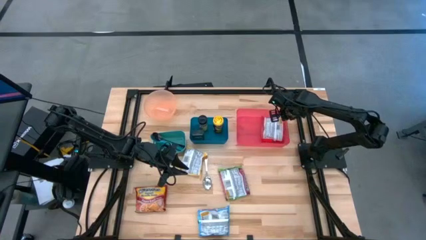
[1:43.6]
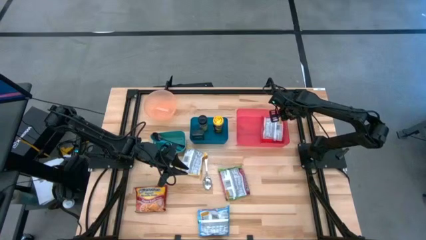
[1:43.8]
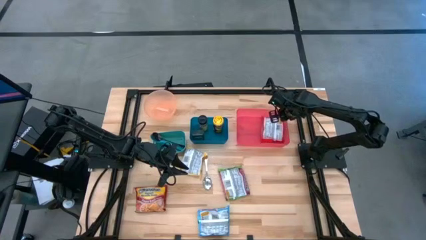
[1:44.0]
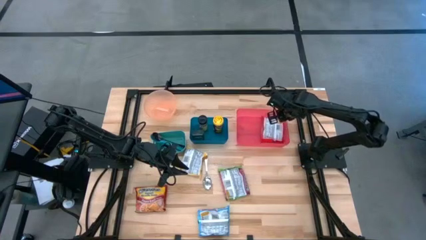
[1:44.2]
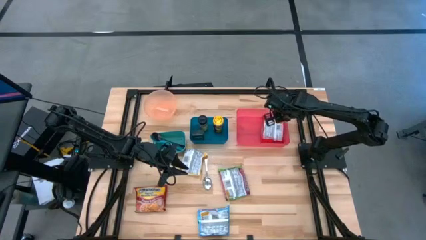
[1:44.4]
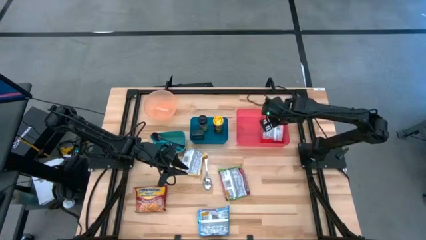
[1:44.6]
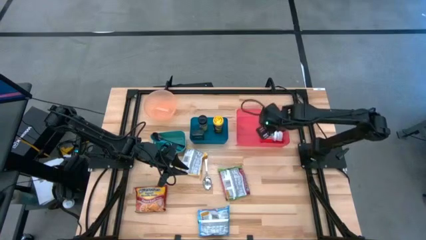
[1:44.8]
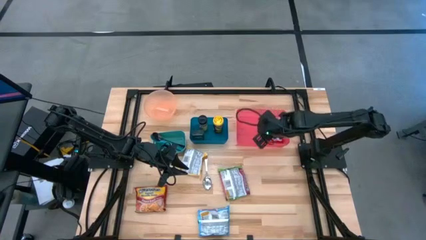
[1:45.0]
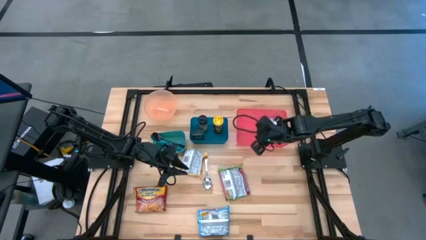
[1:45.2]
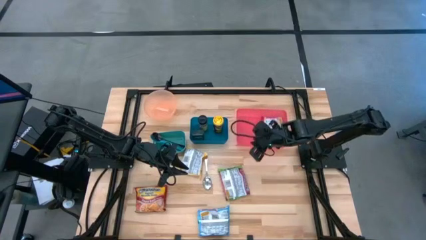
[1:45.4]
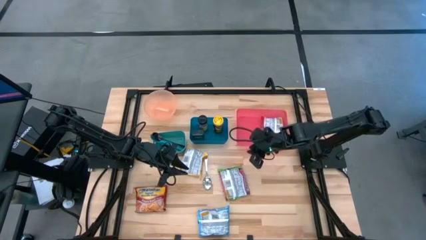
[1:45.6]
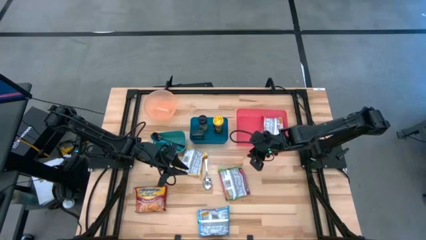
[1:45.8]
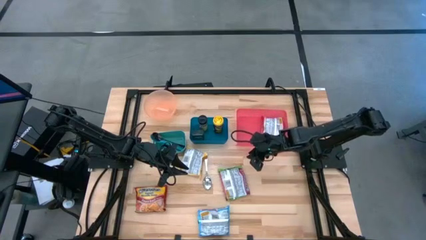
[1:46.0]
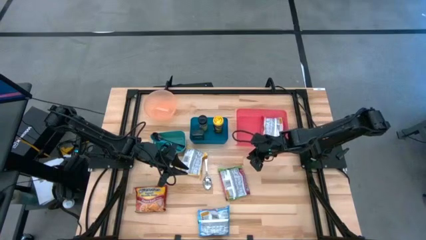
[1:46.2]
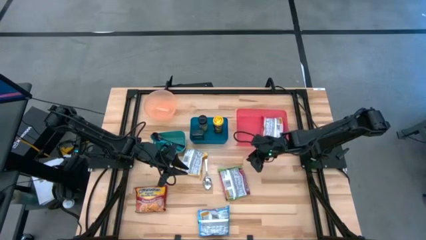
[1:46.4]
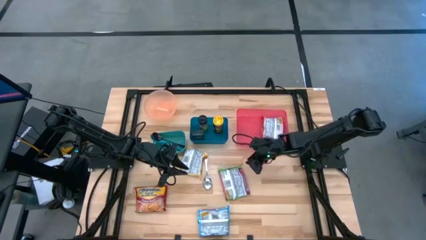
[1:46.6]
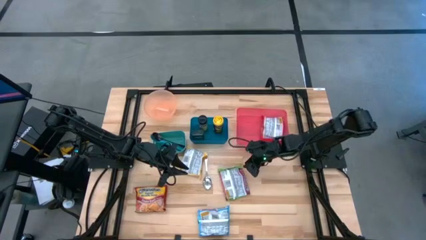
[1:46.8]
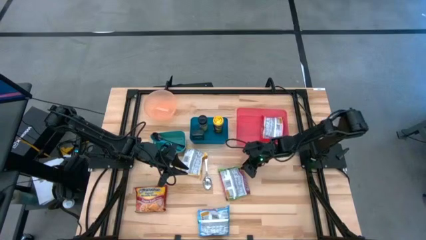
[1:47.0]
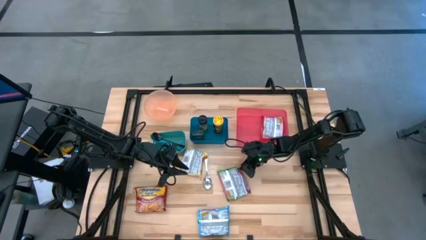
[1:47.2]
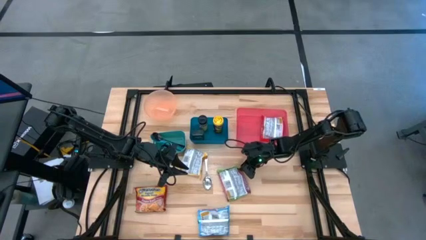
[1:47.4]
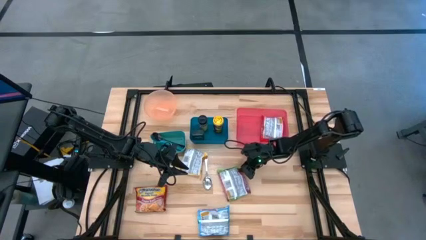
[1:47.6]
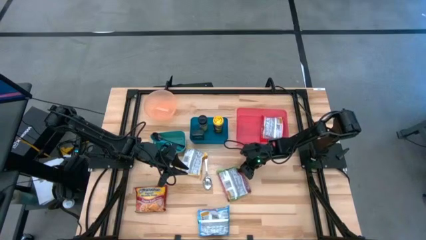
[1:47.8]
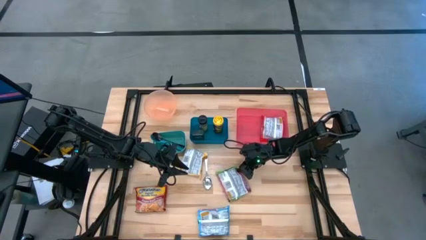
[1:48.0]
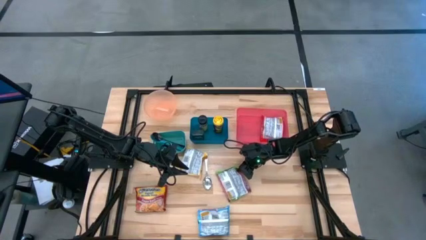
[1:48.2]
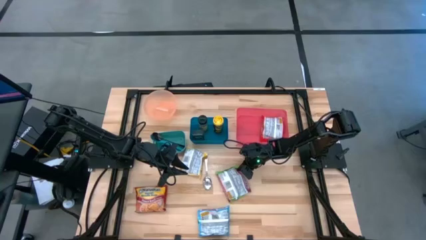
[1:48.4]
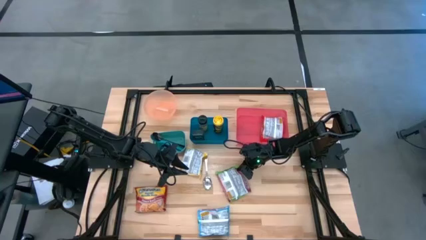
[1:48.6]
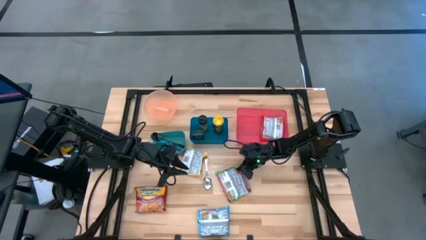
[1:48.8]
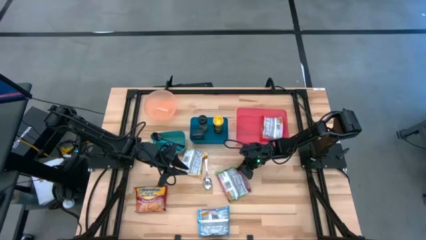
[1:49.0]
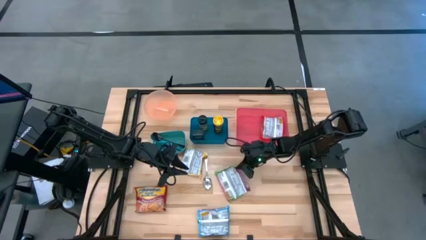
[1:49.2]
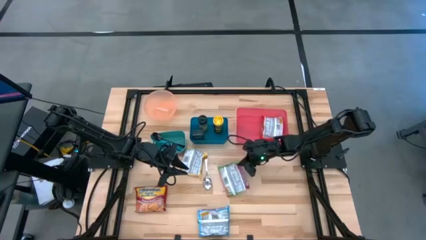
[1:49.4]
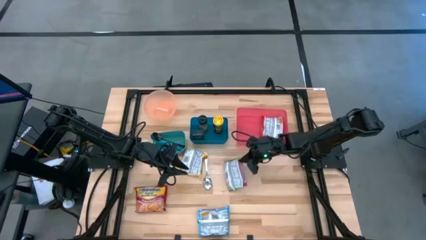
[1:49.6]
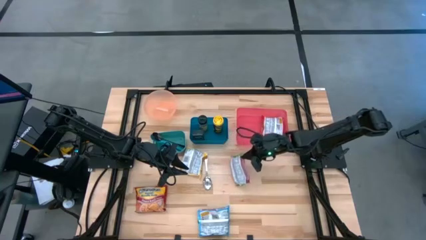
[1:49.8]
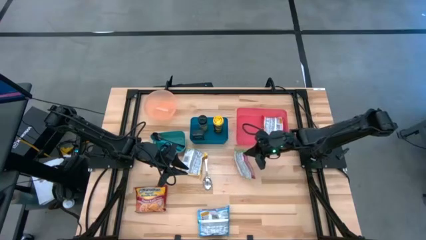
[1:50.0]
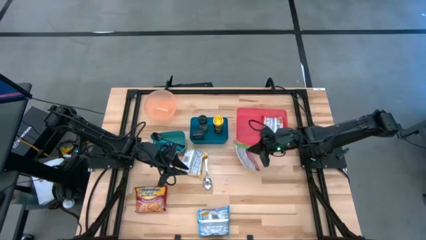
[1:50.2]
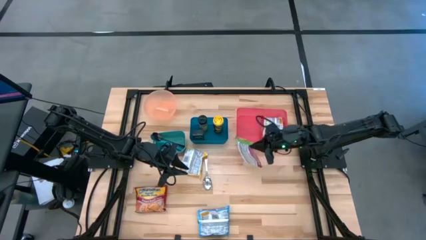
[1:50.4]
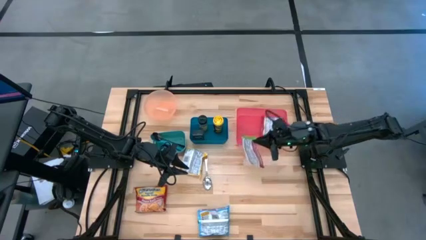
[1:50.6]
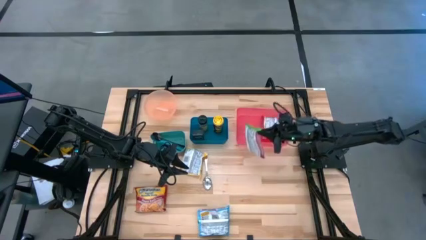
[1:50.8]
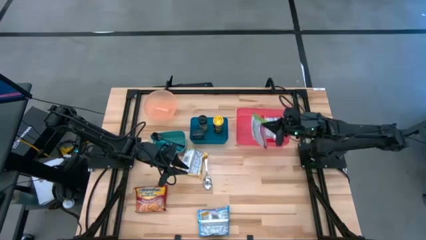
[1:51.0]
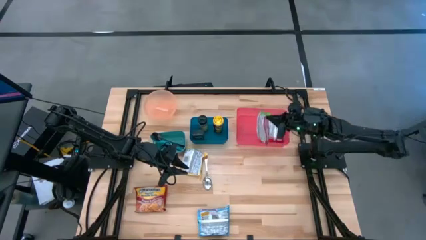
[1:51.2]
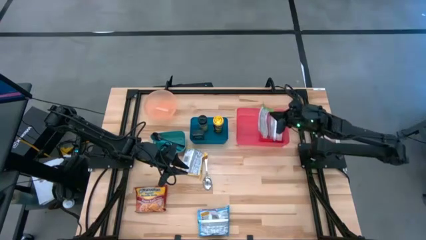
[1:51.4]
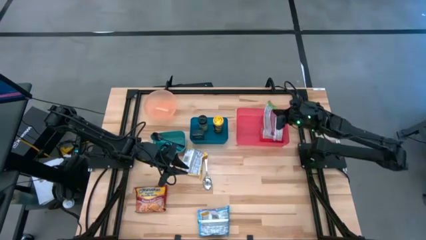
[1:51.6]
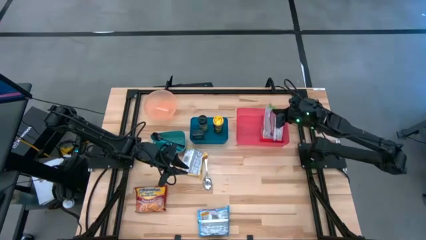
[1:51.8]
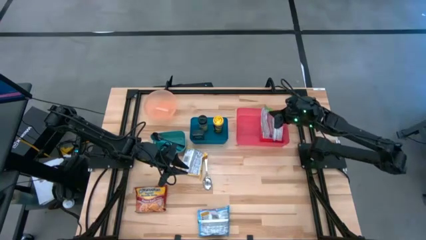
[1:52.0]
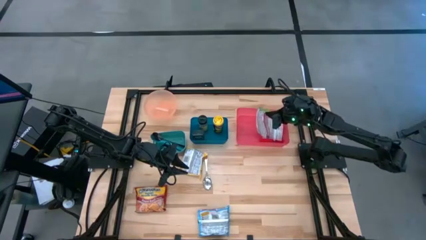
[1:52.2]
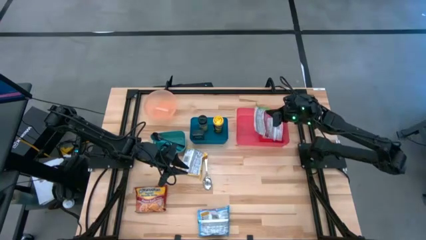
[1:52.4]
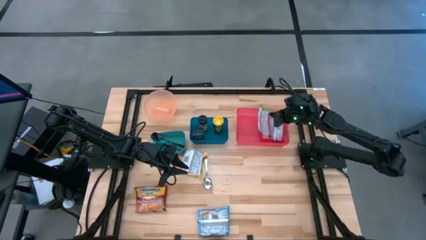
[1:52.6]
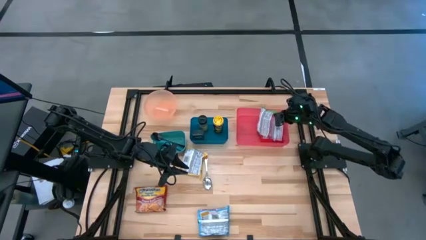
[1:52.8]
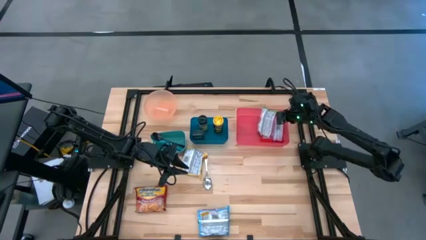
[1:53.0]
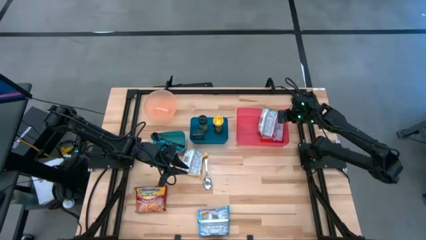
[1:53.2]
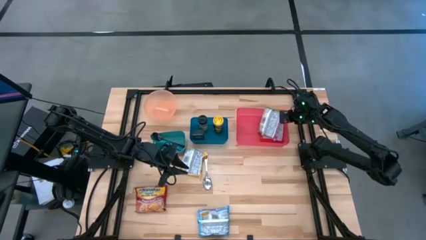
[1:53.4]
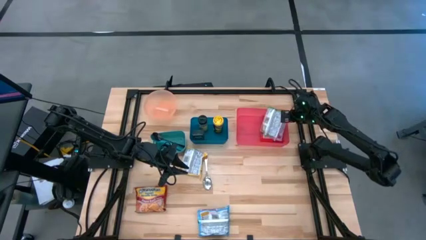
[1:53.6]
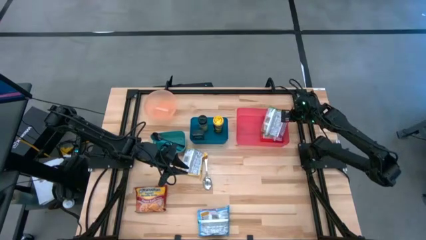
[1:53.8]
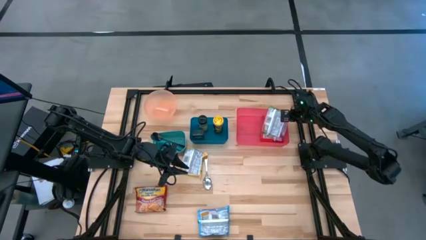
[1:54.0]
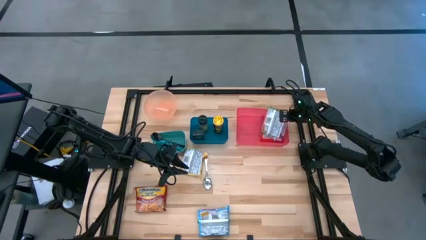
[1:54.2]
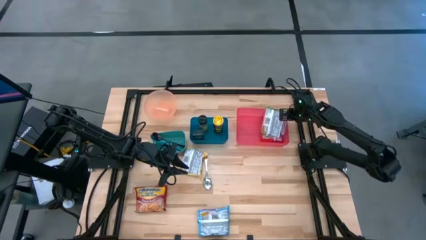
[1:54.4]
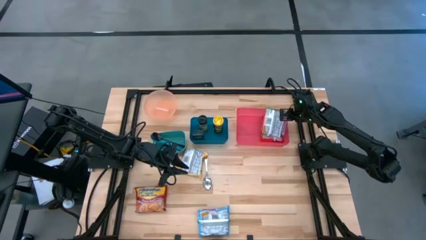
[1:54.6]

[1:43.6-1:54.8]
Task: Pick & Place Food Item
Put the green noodle pack into the pink bin

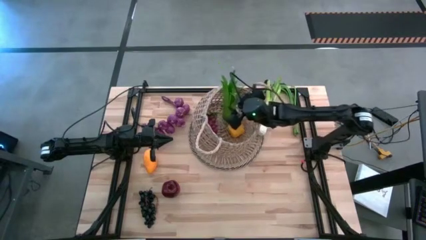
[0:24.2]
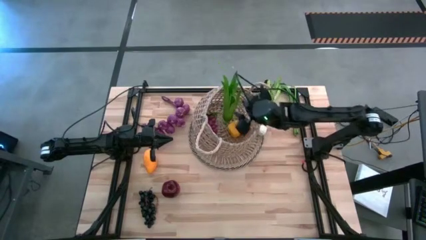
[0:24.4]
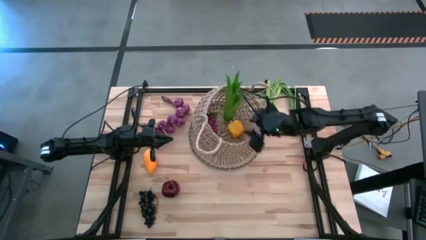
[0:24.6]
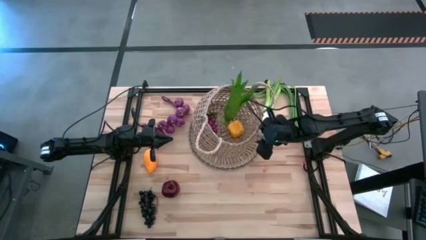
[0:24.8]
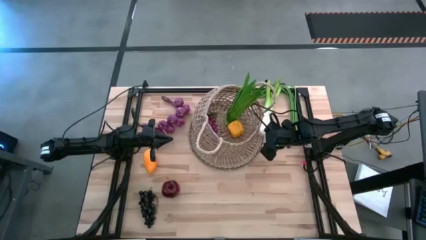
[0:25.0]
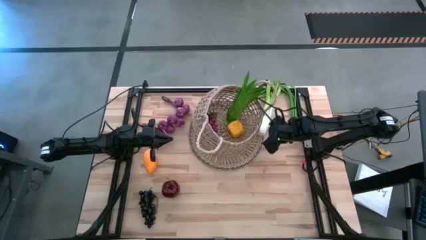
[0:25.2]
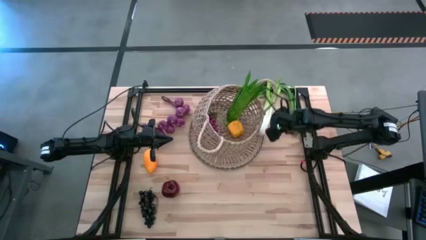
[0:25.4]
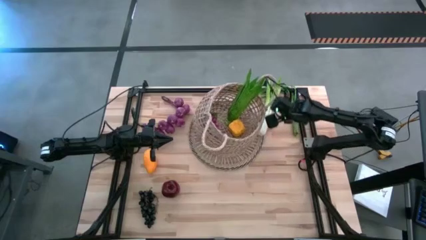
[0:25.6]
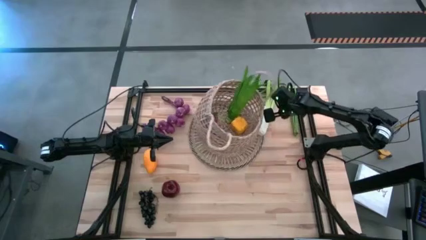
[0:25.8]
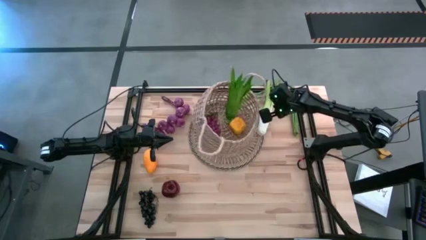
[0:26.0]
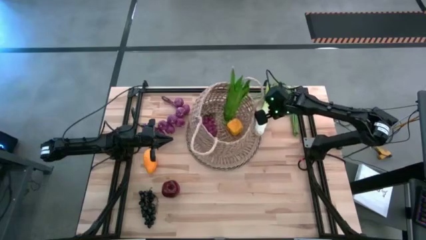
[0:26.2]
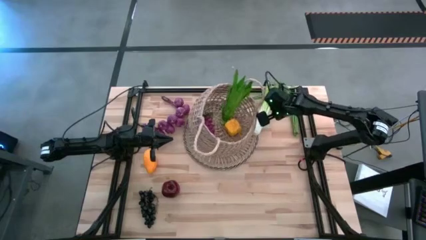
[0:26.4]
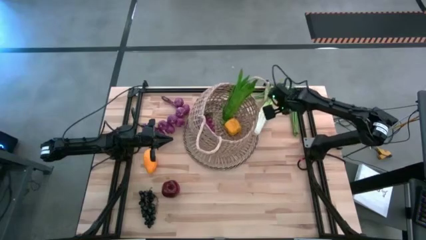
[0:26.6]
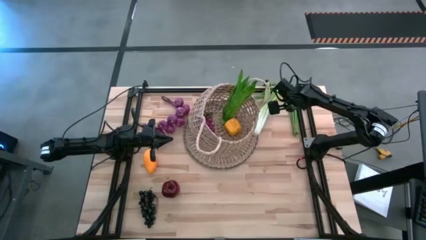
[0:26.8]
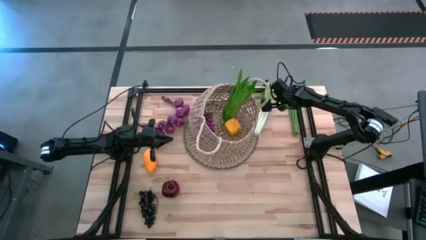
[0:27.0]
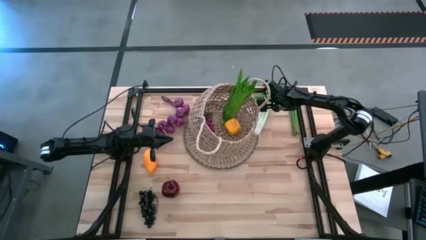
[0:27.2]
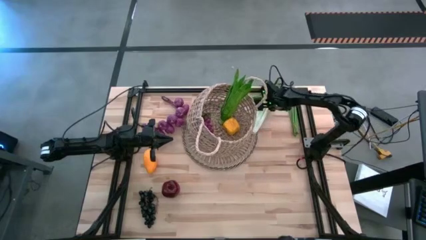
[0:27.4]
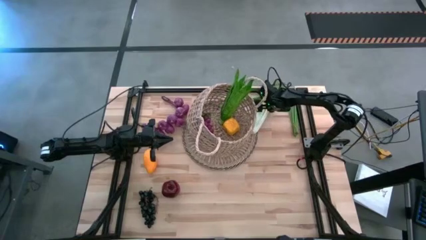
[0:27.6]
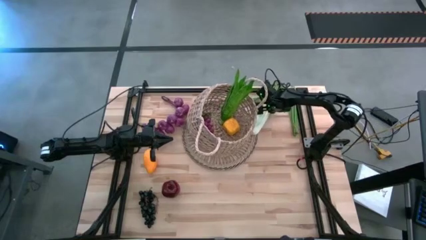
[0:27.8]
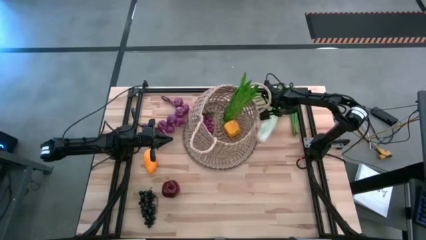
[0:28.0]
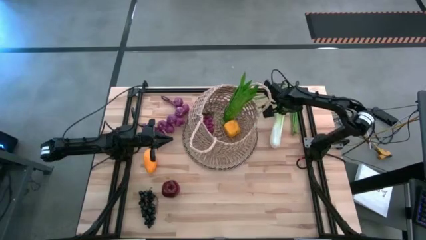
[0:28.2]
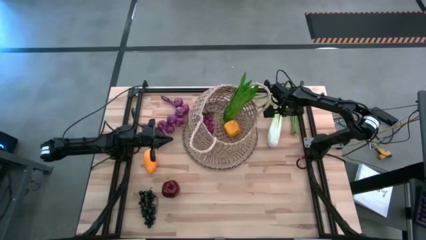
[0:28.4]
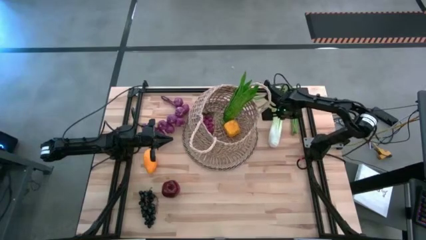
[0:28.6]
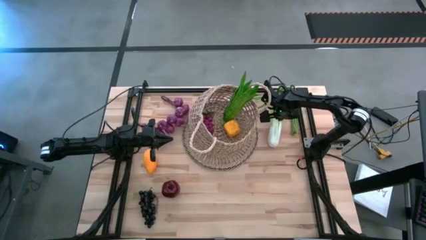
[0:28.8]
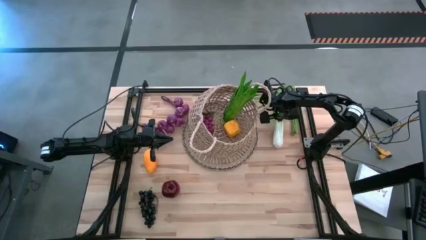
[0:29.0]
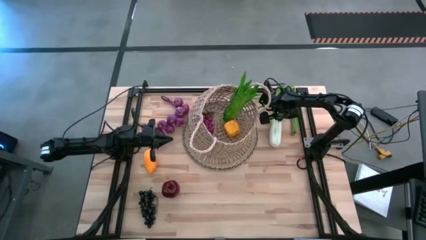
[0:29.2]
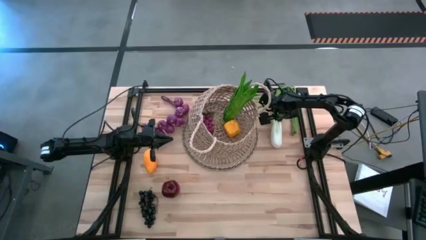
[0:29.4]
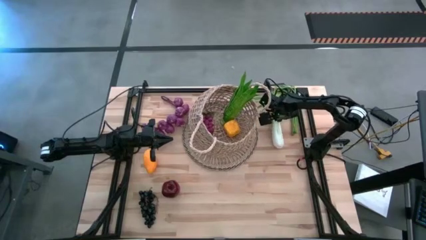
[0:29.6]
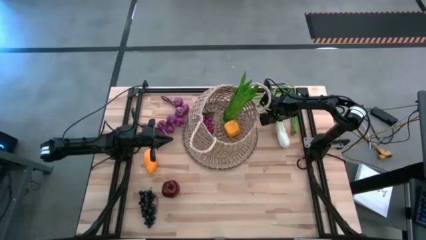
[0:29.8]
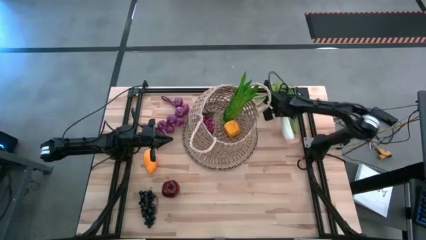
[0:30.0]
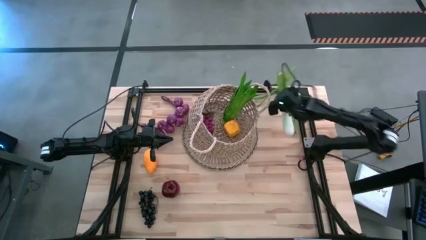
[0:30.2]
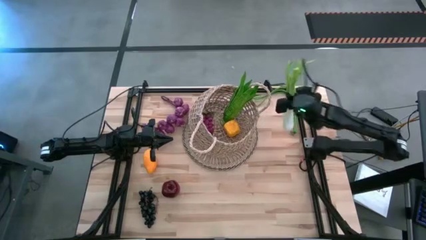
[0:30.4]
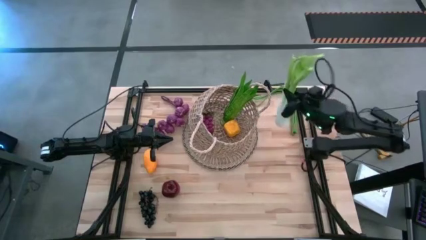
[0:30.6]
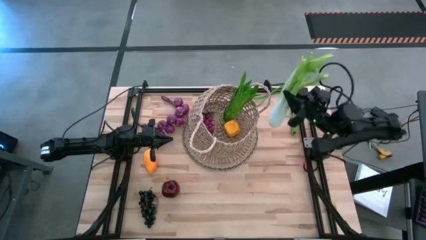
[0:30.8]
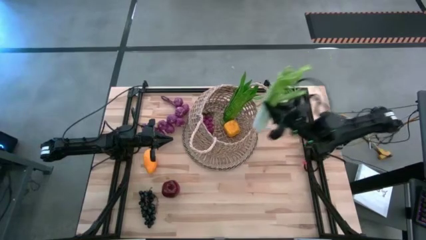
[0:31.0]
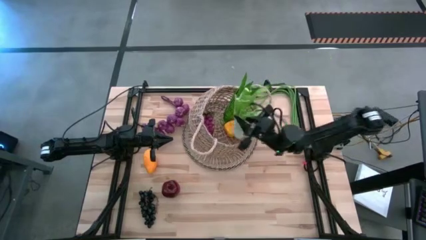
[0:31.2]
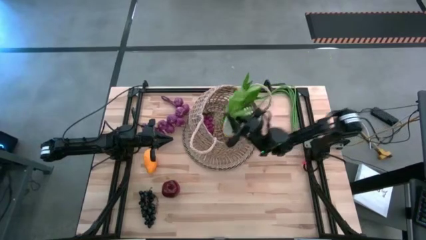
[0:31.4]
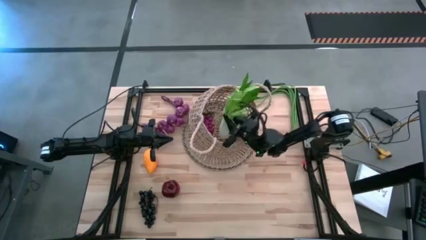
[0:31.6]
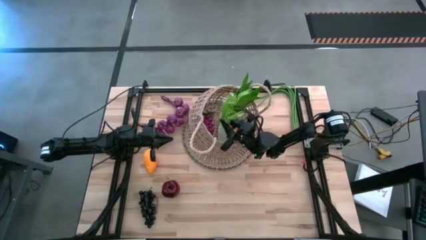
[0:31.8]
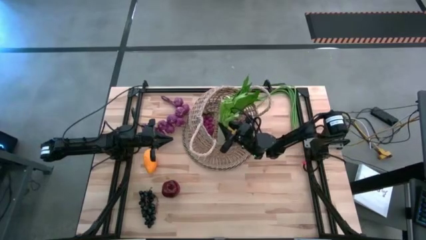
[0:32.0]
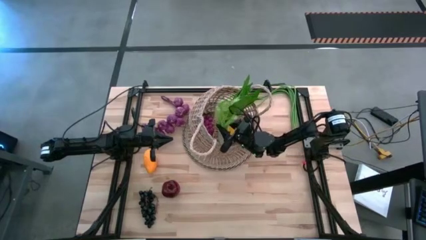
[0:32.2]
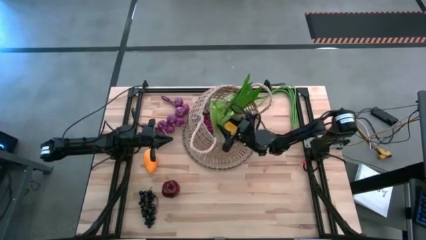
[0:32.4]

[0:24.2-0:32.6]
Task: Build produce basket
Put the celery into the basket
